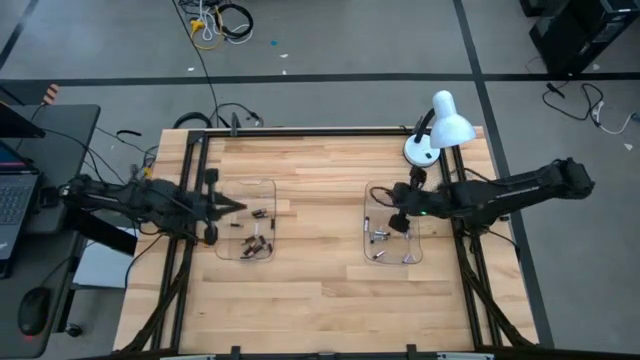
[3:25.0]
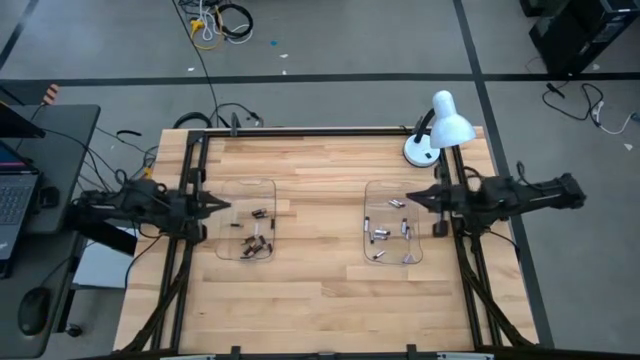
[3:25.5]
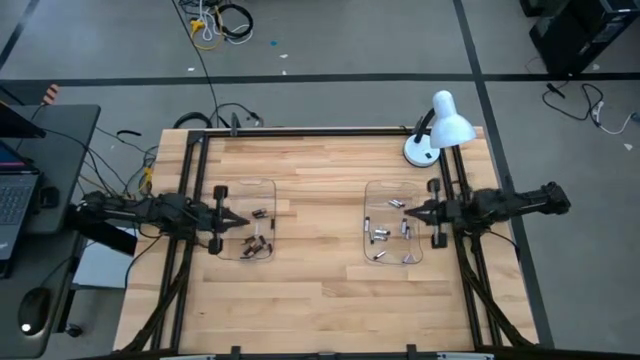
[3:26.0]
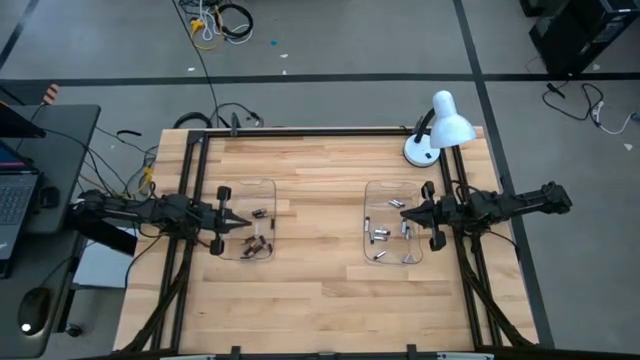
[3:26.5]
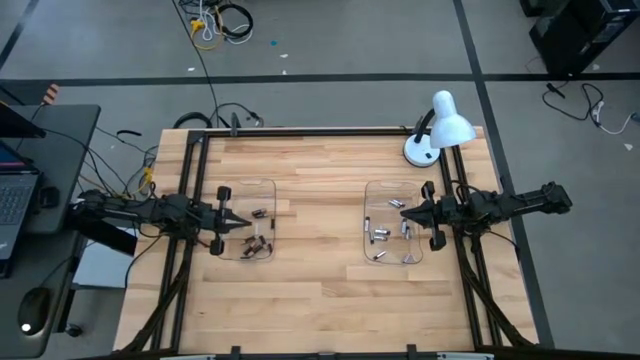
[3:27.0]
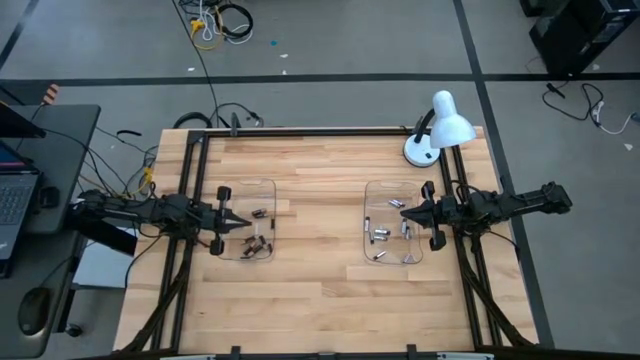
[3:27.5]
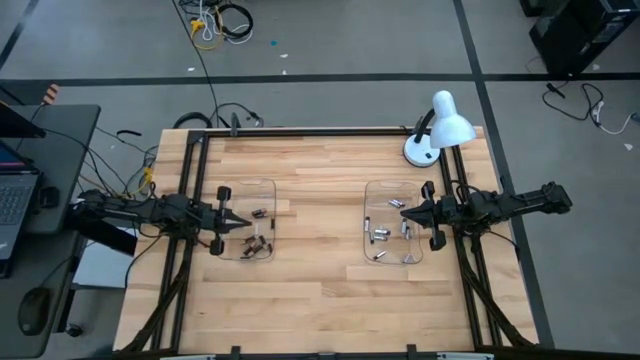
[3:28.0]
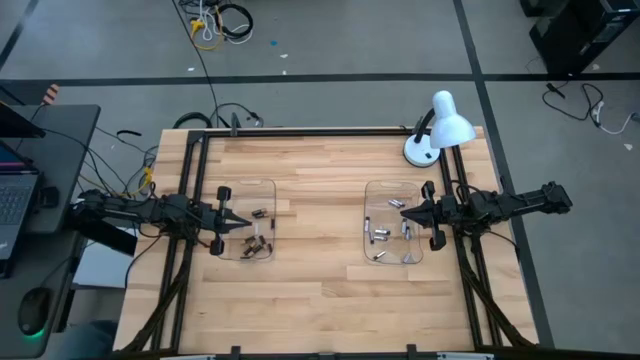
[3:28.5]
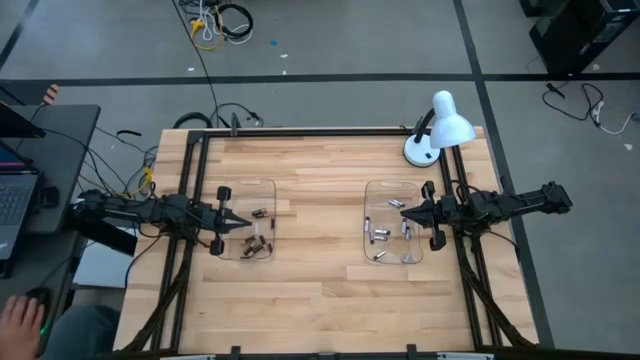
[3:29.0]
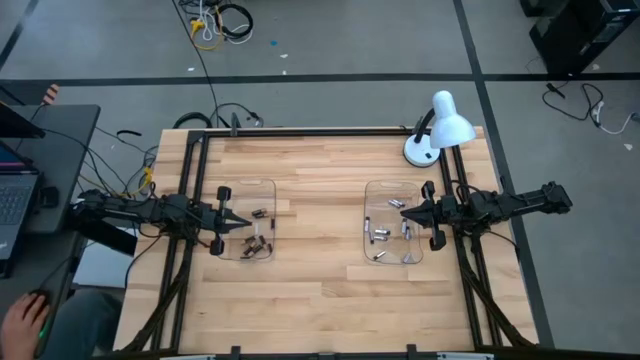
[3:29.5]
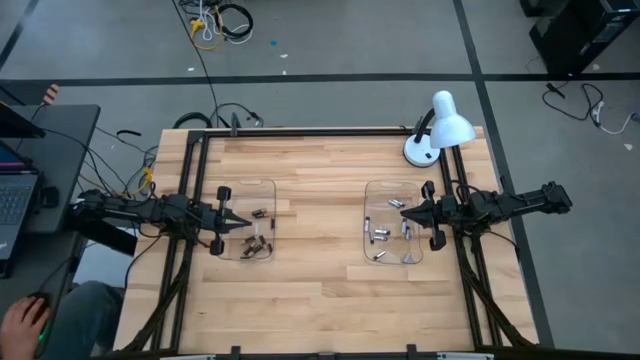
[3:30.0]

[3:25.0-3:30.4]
Task: Sort batteries
Return to Home Position

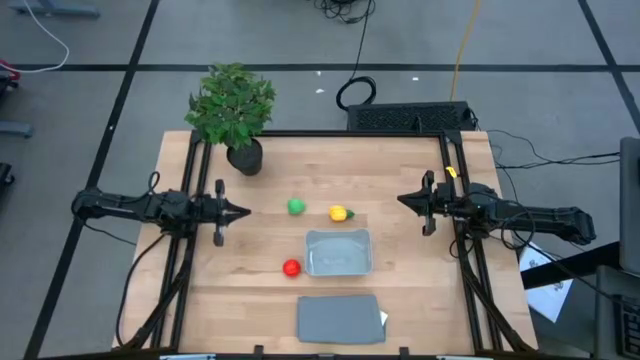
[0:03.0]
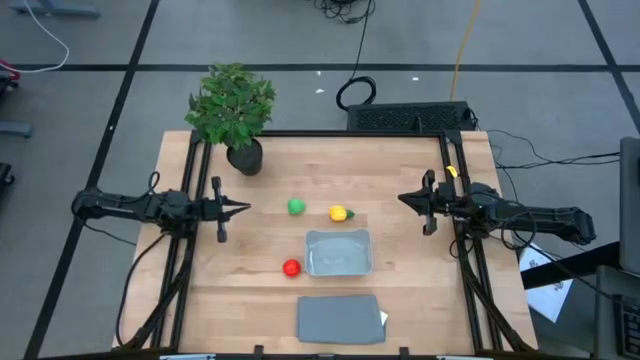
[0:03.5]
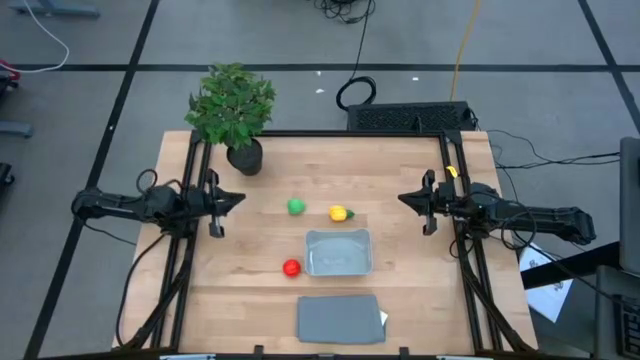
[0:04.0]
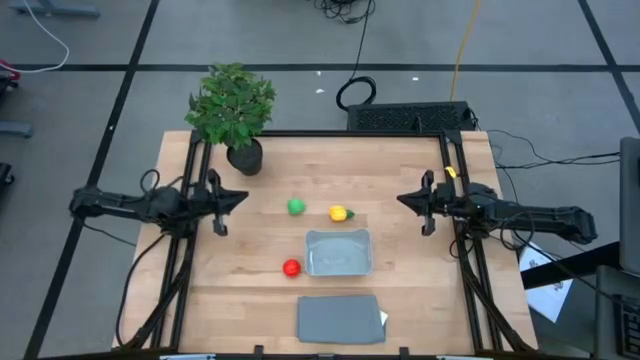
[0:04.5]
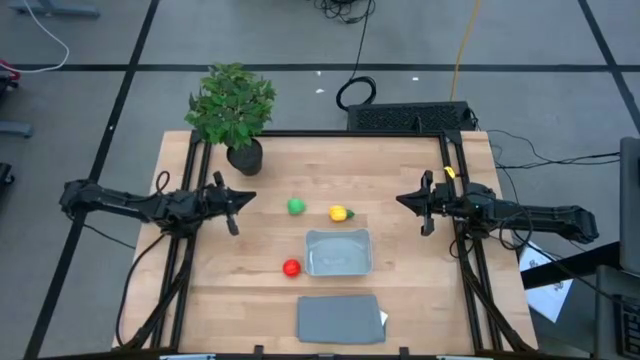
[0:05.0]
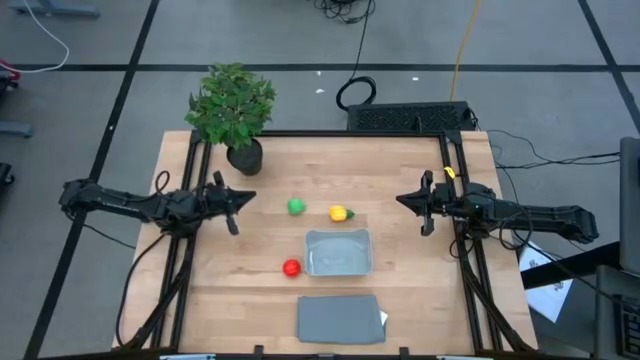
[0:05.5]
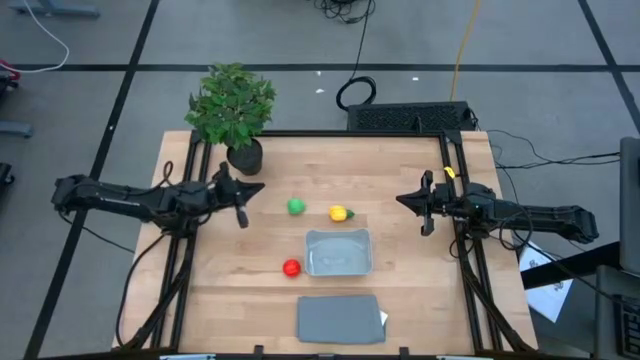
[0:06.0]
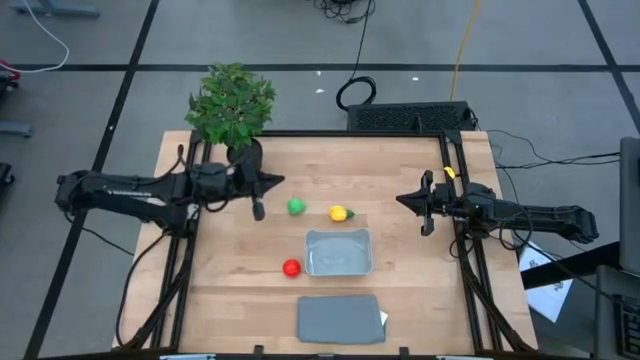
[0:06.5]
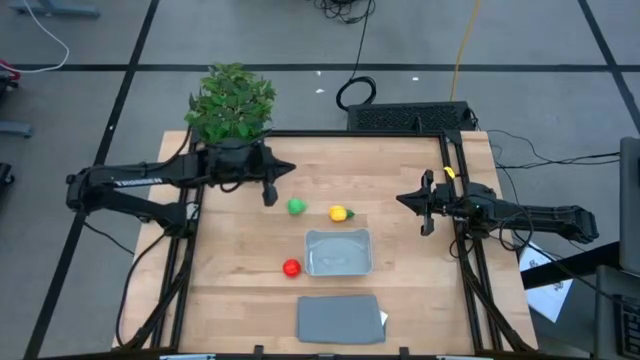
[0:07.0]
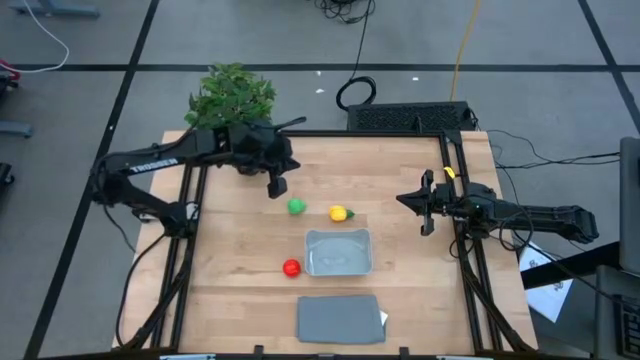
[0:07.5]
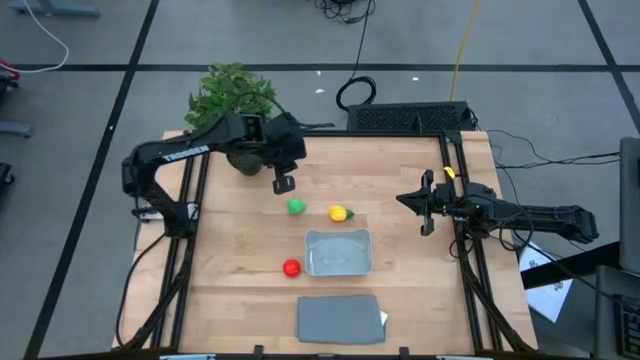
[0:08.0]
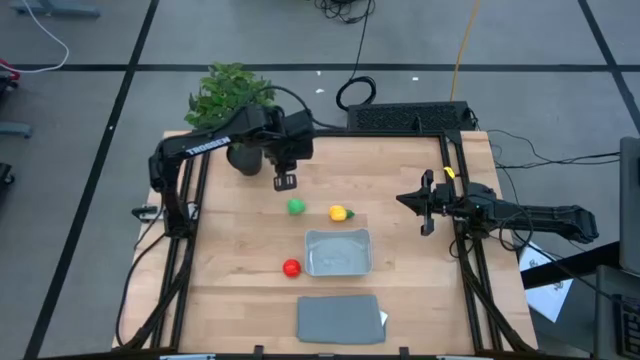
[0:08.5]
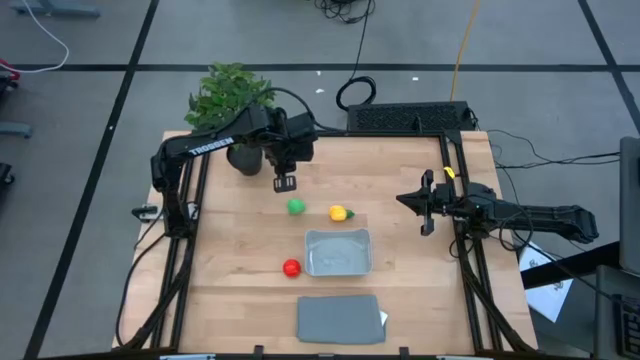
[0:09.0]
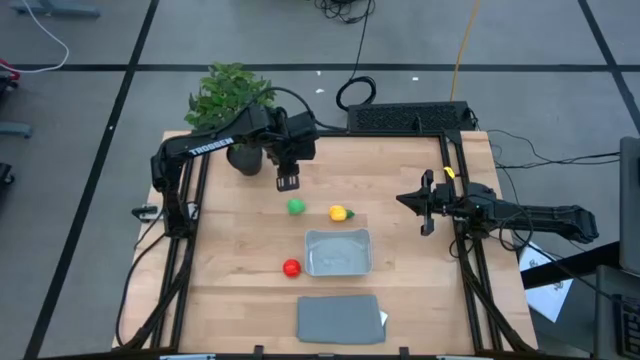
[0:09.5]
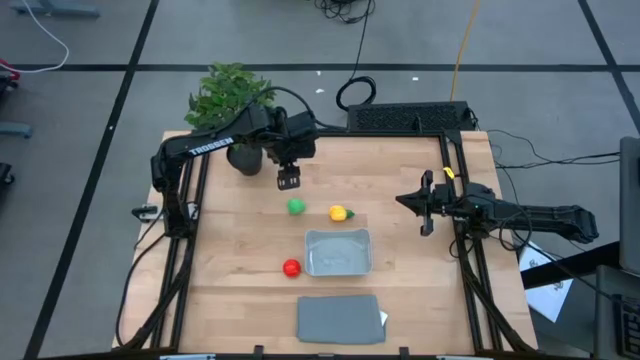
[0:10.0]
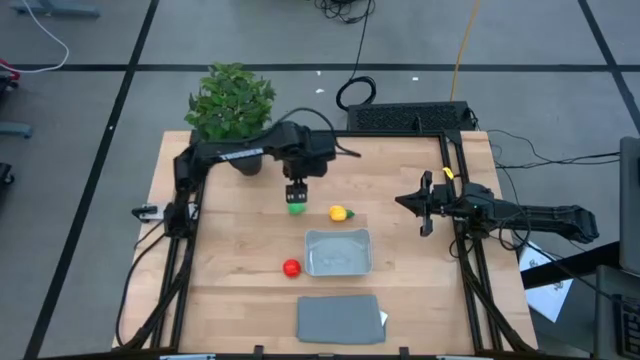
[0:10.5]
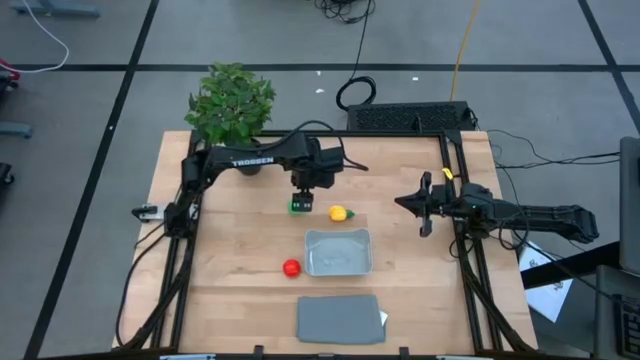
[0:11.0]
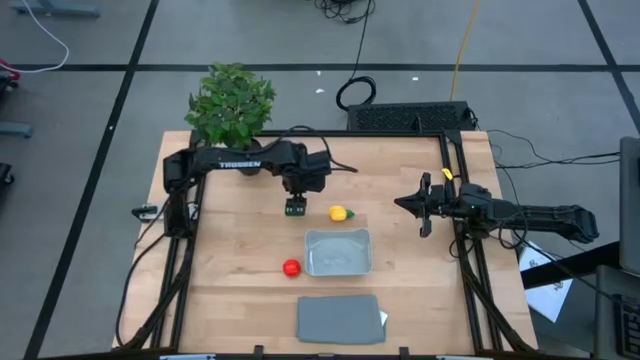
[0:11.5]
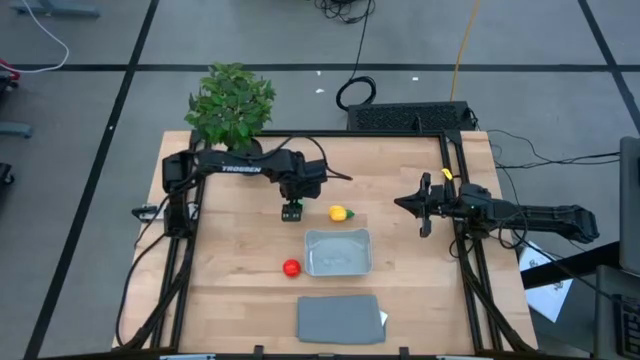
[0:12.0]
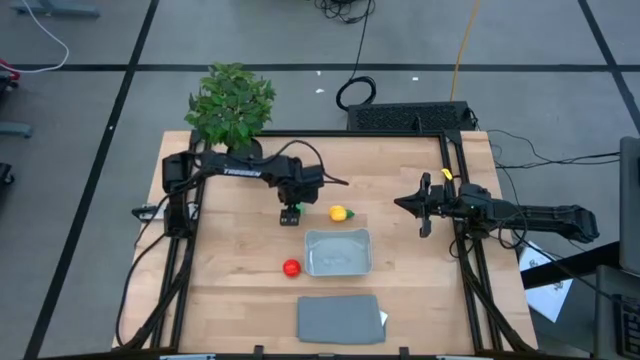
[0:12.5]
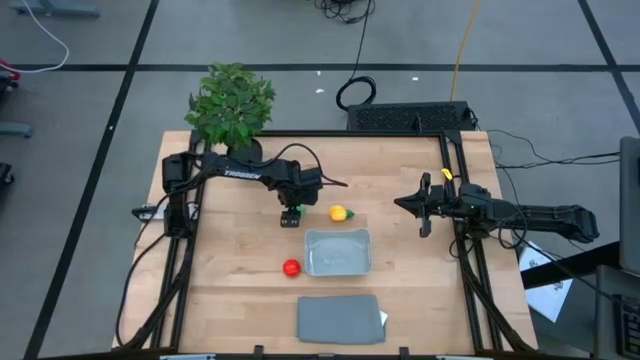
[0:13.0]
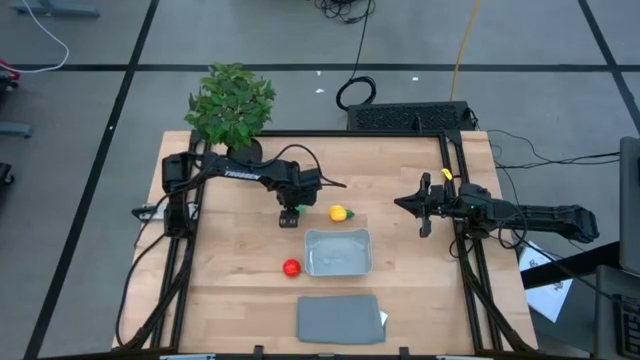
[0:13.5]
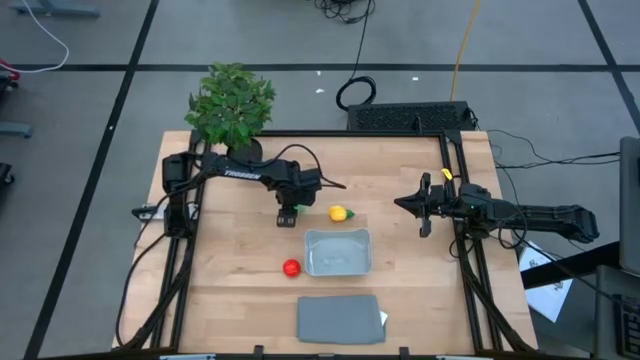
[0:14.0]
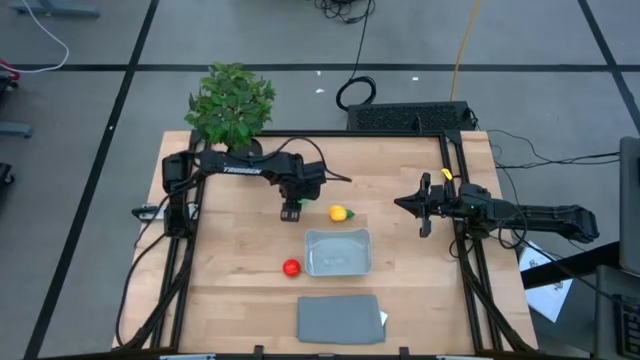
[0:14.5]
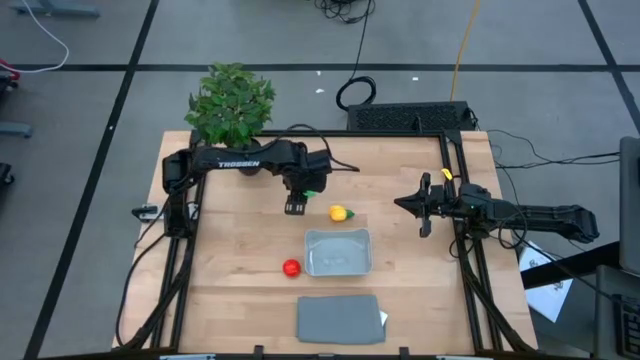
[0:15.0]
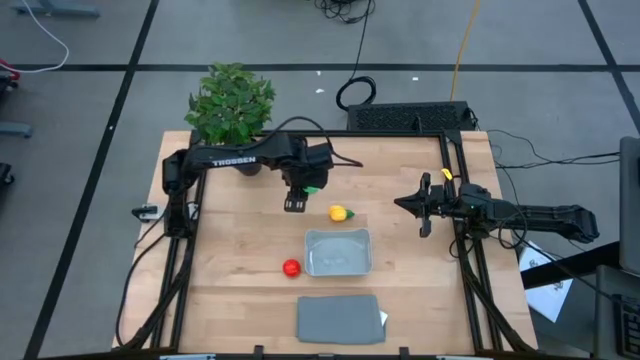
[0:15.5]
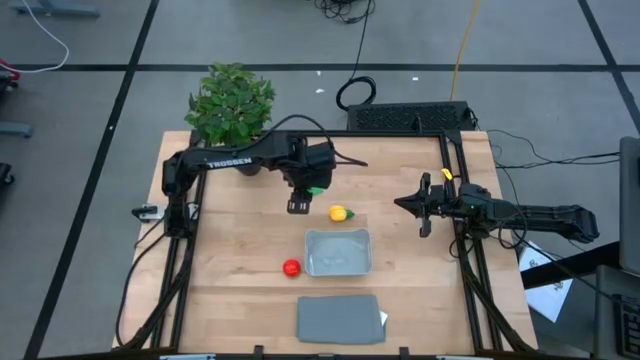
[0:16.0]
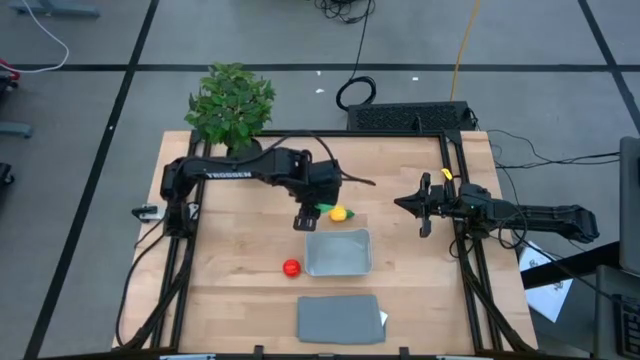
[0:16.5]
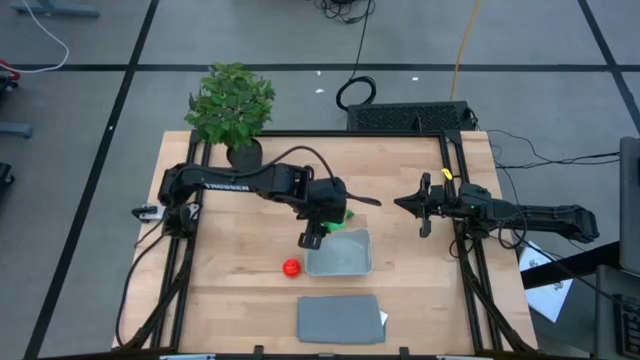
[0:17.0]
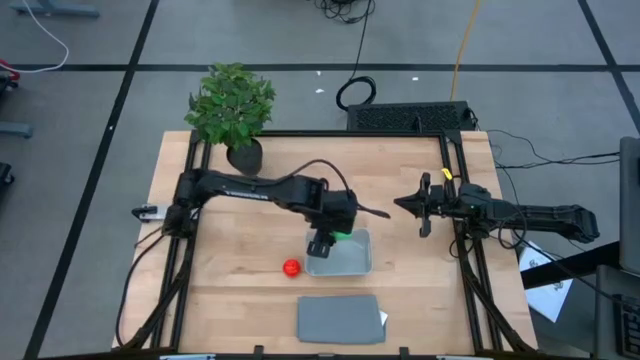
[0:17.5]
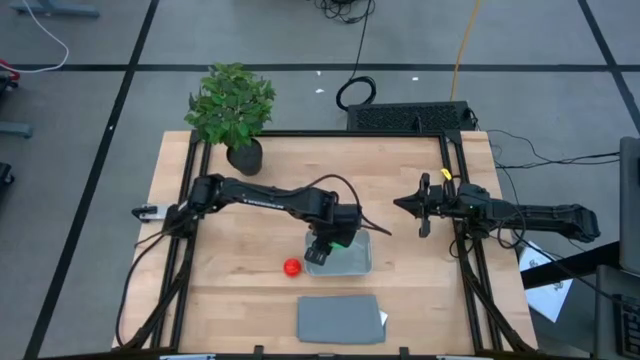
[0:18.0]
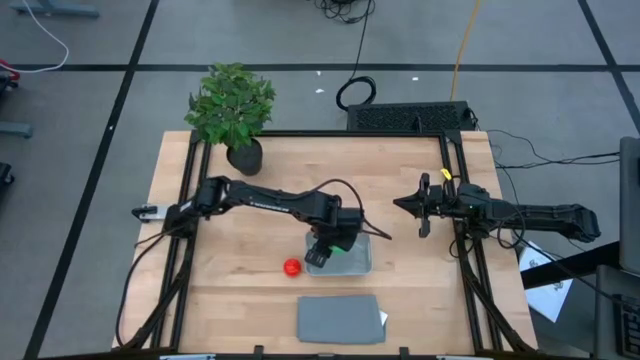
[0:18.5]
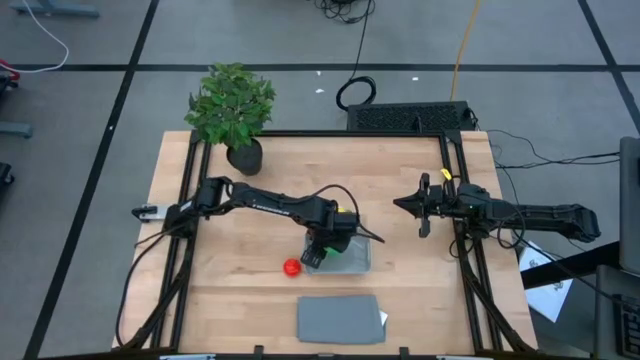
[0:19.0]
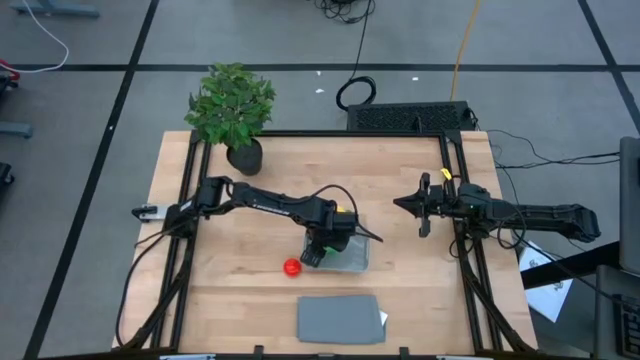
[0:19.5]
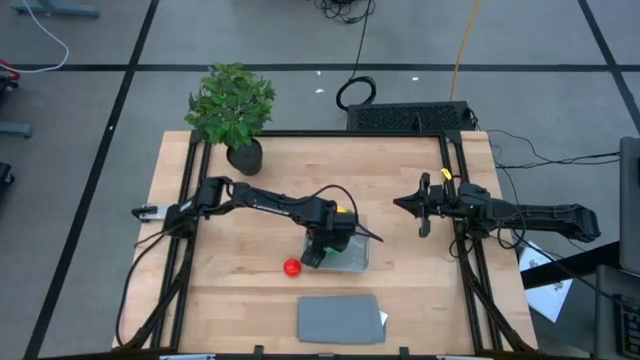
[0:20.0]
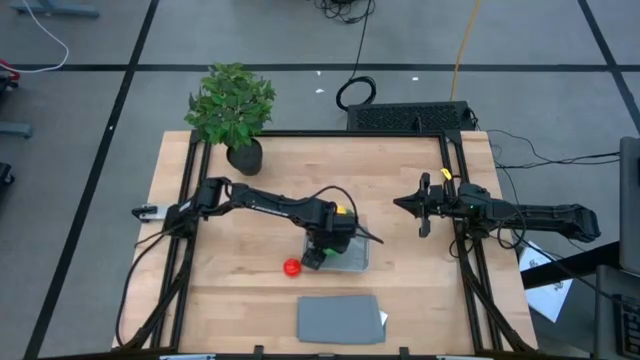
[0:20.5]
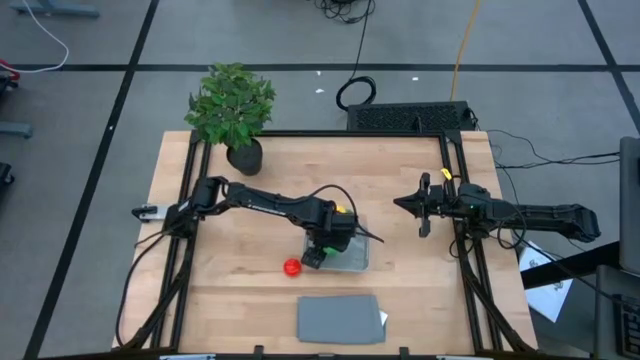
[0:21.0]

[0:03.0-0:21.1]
Task: Pick and placing Produce into tupperware
Put the green pear into the gray bin
